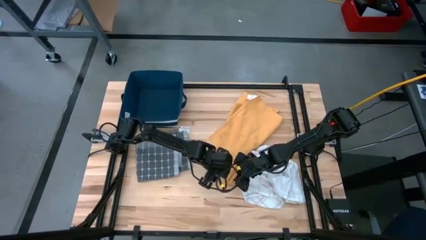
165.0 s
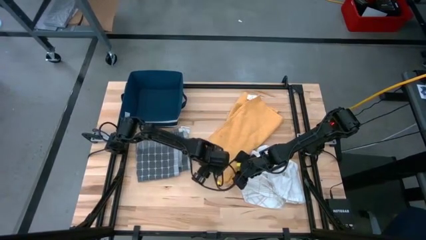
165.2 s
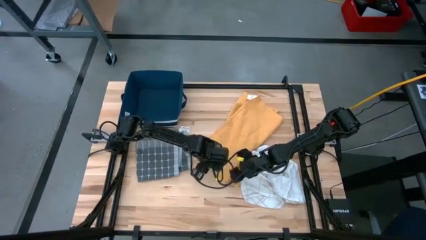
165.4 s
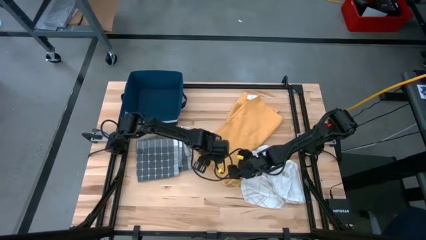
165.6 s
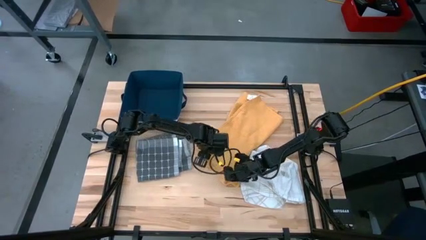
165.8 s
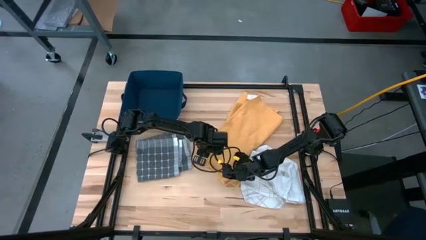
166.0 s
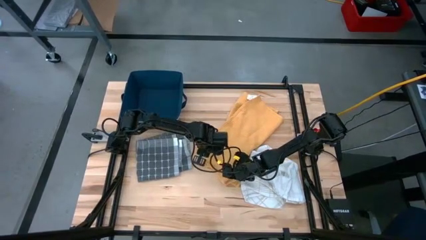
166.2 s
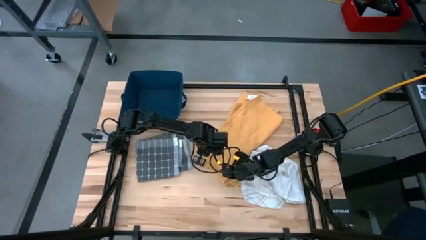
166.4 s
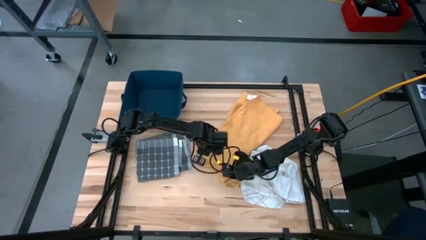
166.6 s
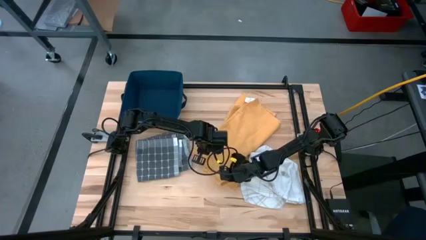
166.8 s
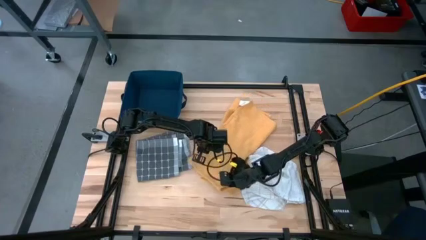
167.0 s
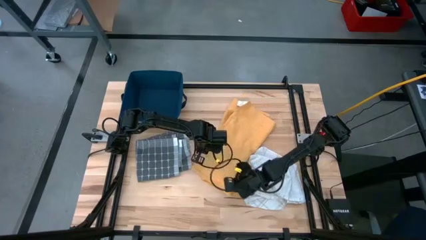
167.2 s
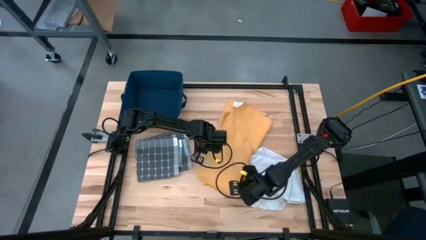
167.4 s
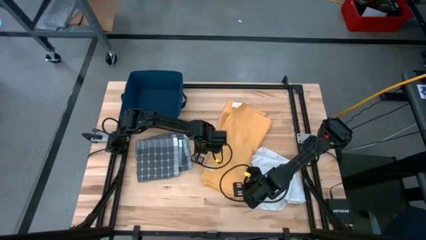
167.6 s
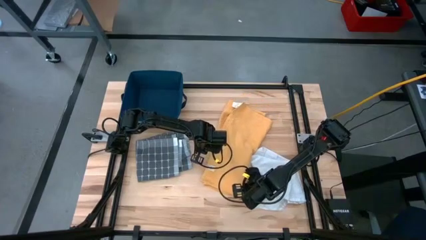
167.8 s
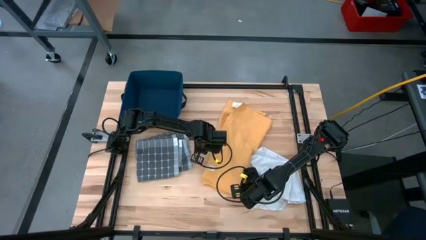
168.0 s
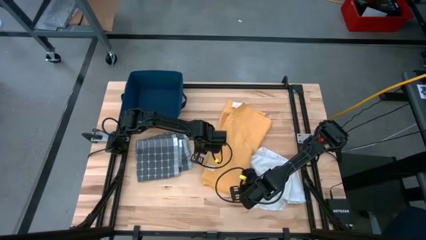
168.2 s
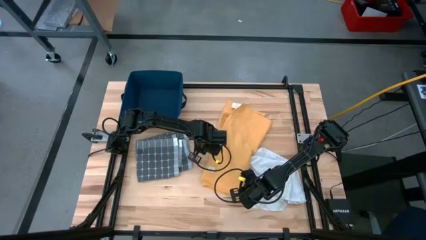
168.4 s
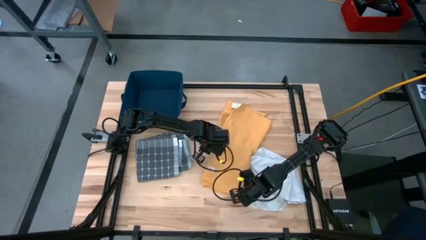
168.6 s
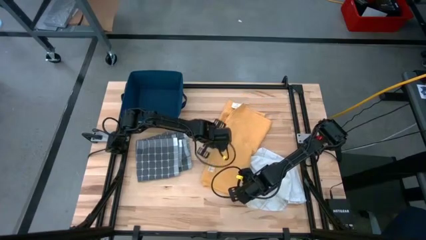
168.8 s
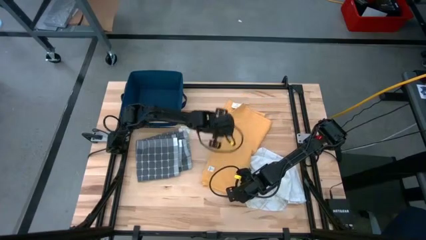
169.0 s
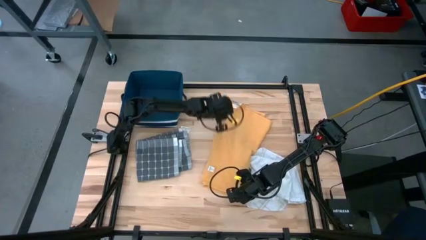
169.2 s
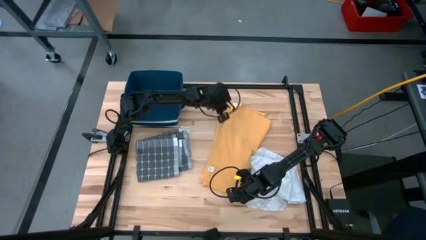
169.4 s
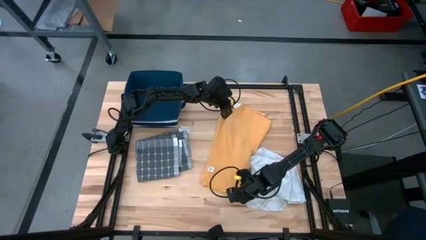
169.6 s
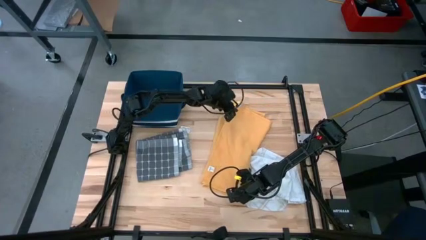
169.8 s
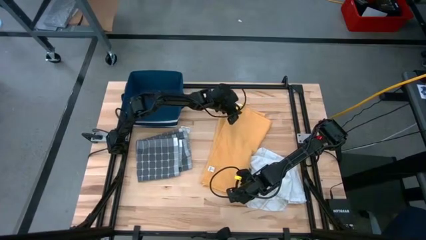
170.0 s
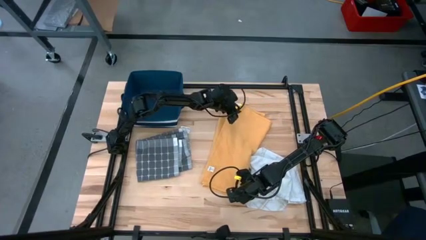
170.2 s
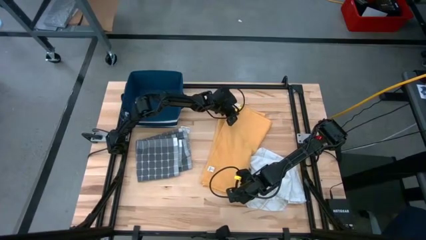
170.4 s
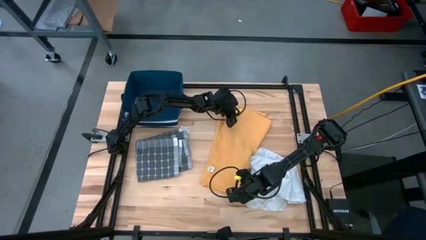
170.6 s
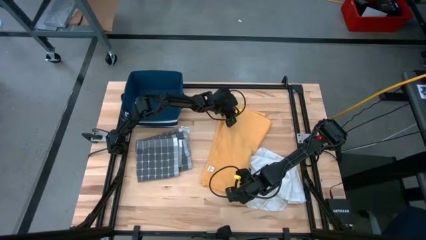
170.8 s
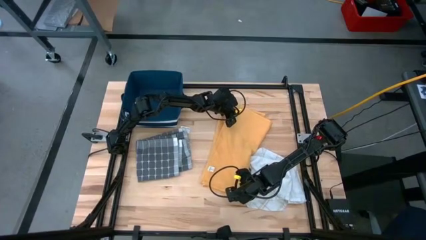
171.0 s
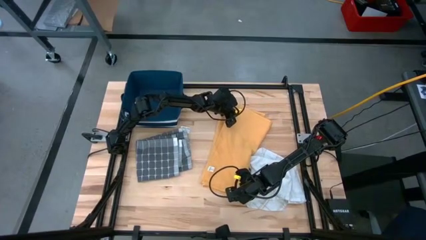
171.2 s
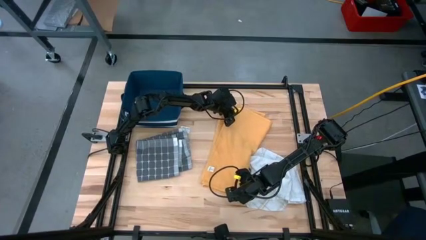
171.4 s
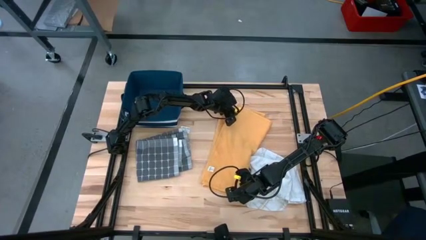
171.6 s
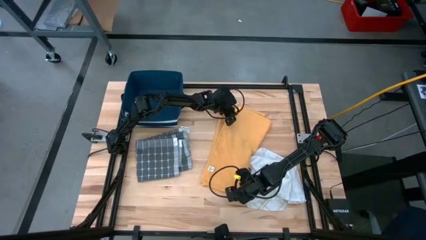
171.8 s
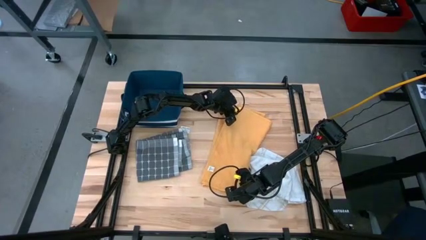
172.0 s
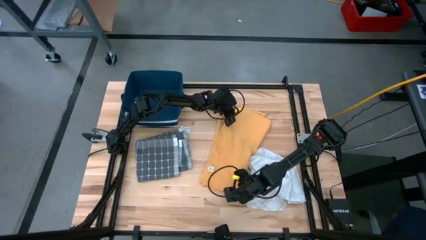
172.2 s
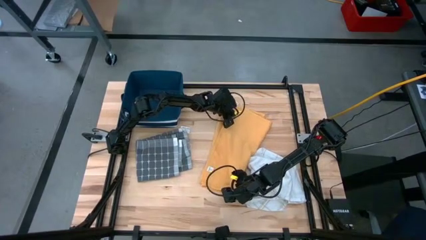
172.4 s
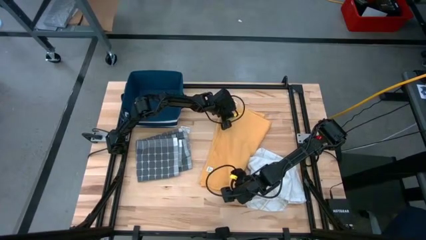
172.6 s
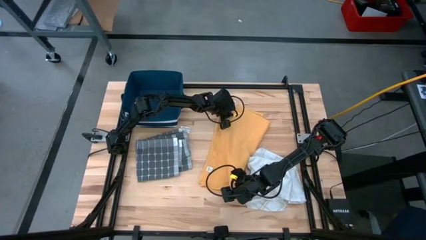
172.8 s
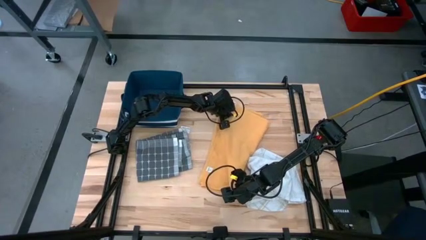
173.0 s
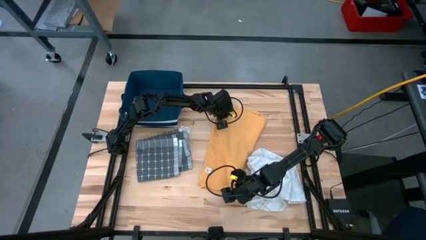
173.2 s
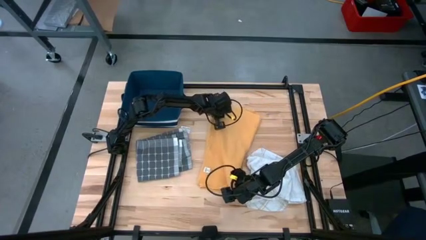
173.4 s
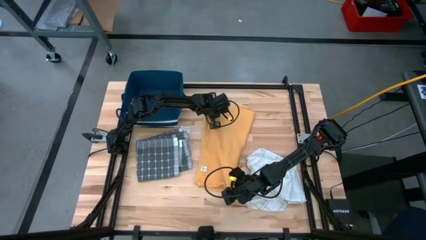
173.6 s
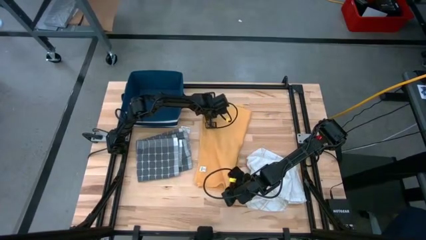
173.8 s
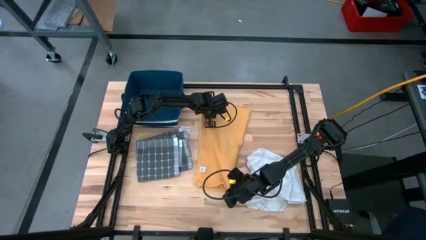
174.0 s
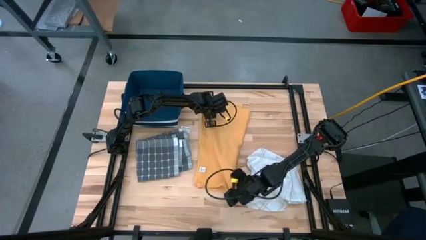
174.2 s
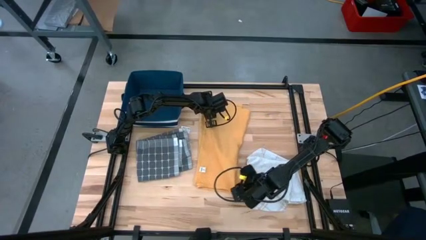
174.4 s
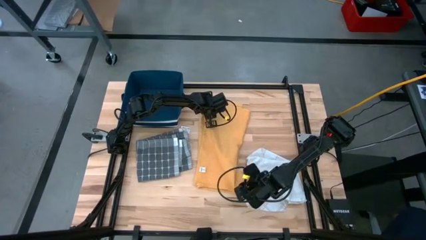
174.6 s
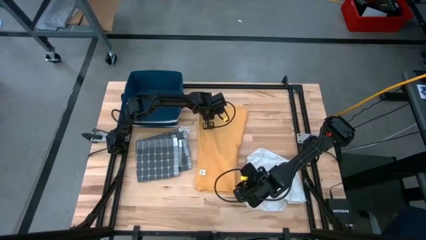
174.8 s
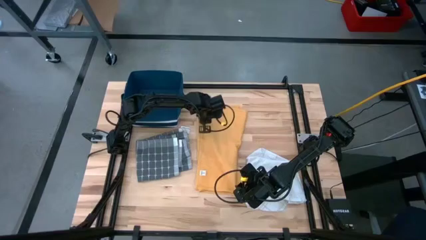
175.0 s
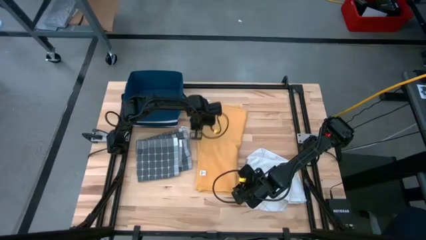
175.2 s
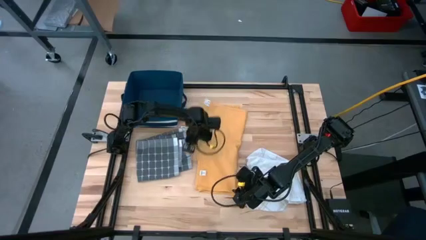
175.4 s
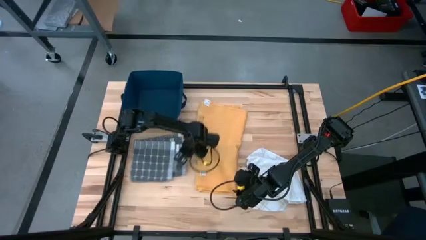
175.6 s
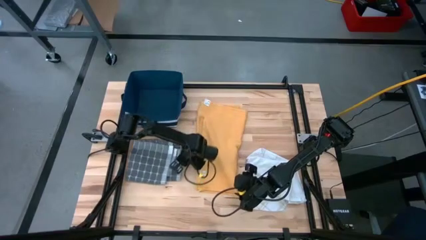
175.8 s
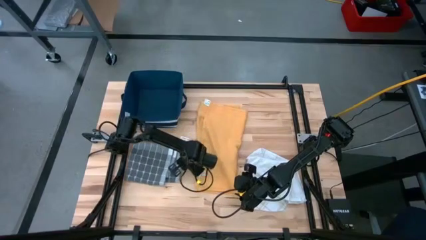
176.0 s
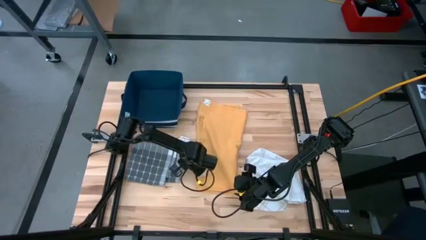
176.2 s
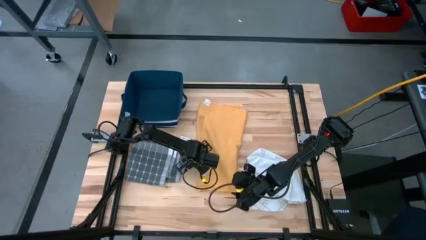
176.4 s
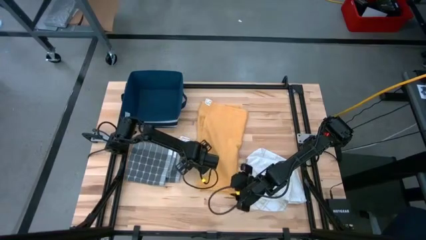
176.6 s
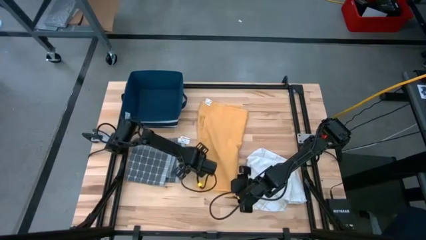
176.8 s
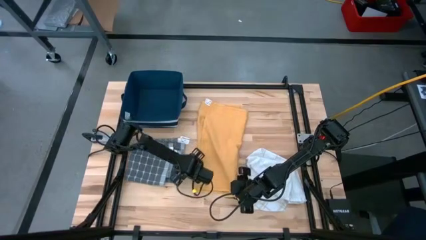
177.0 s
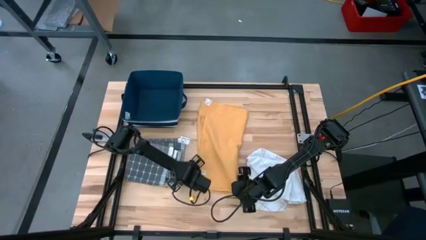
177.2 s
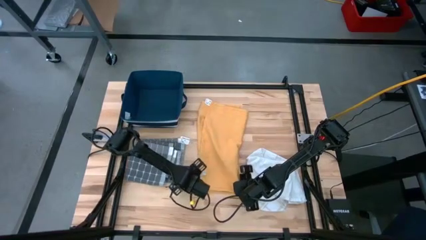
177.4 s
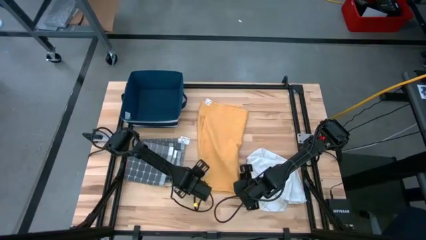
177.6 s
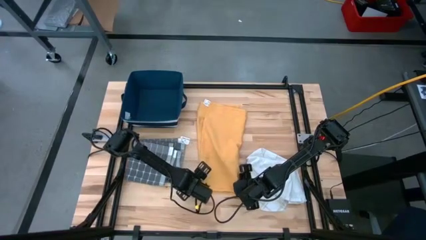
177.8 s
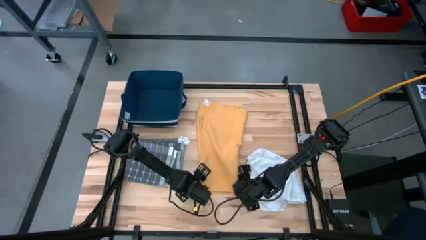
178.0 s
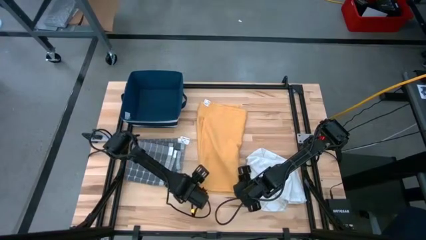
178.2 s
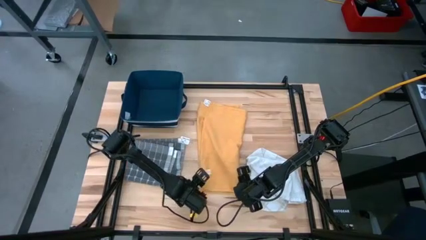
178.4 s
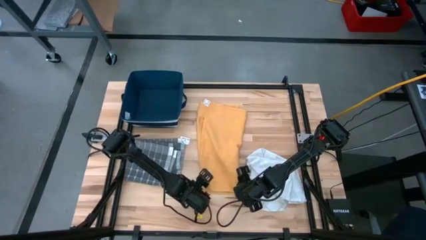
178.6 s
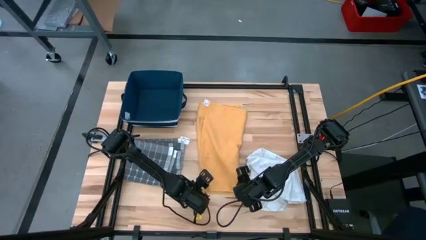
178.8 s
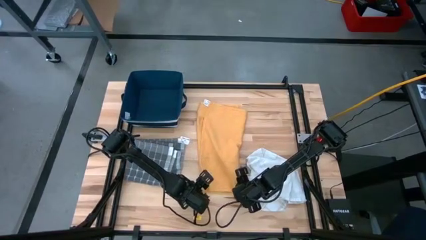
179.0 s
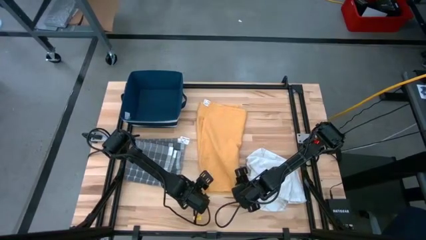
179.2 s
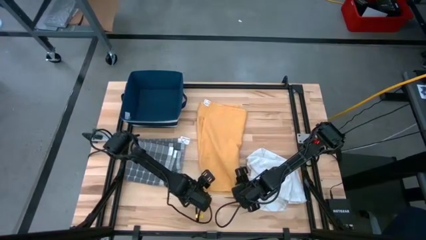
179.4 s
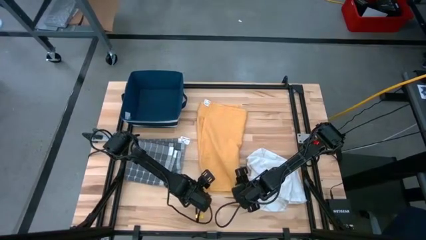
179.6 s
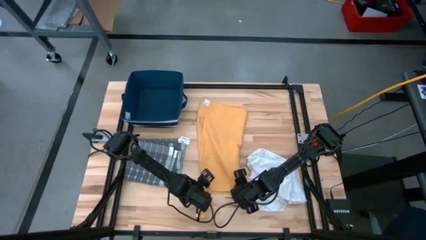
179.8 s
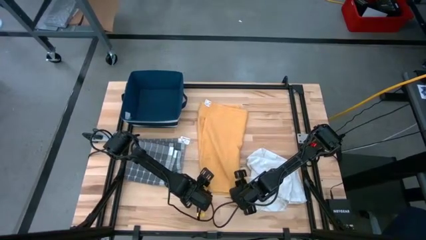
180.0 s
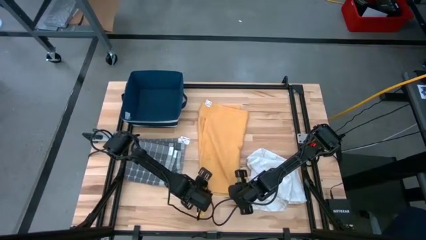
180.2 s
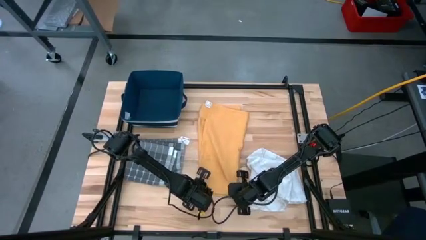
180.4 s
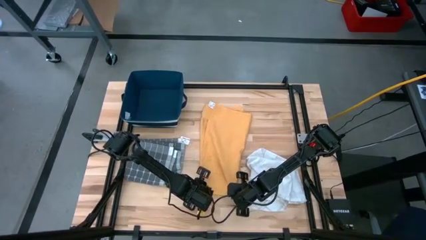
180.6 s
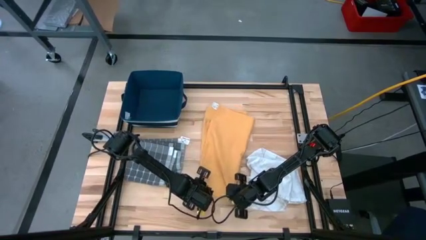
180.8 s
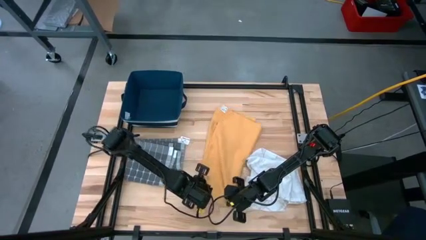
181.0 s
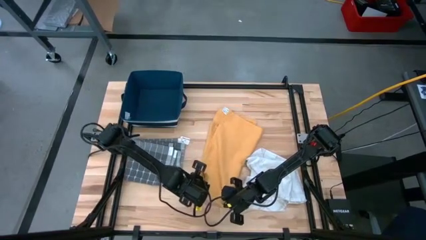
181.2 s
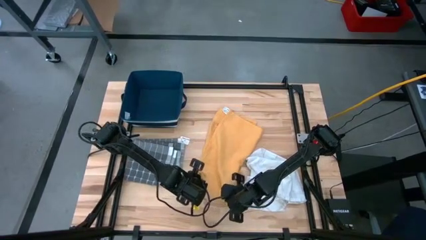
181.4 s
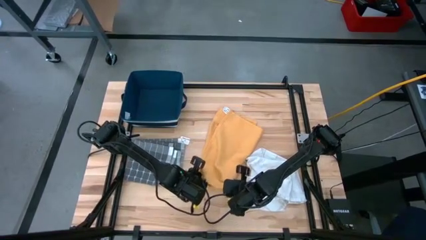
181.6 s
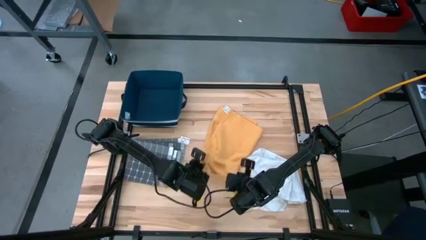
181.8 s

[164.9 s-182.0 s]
Task: Fold towel
Fold the yellow towel
